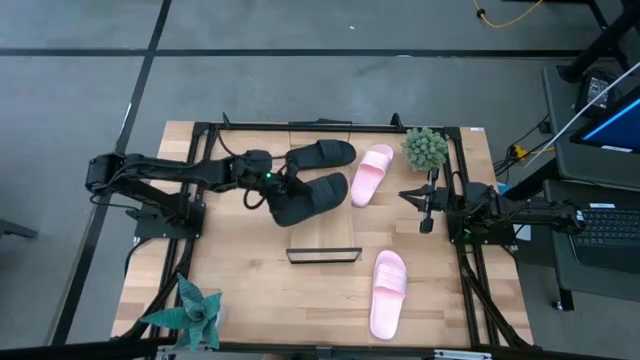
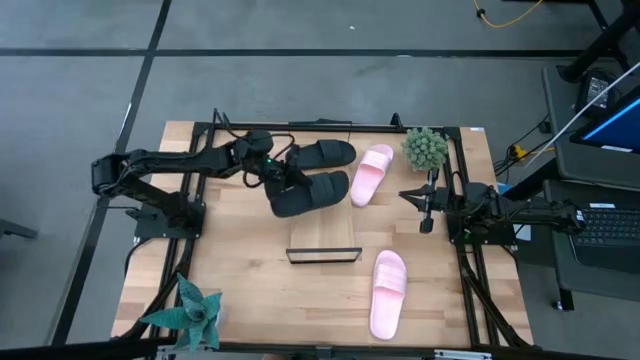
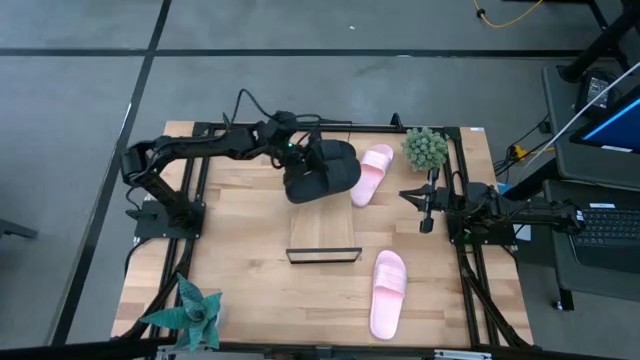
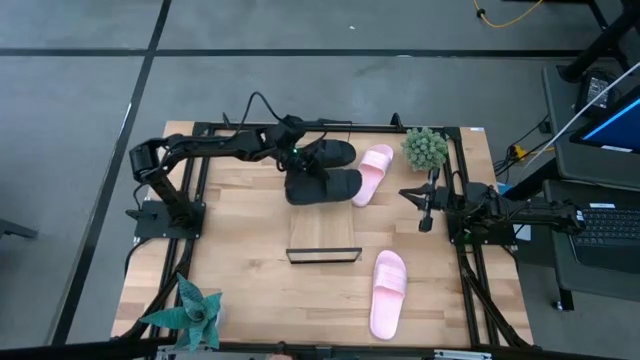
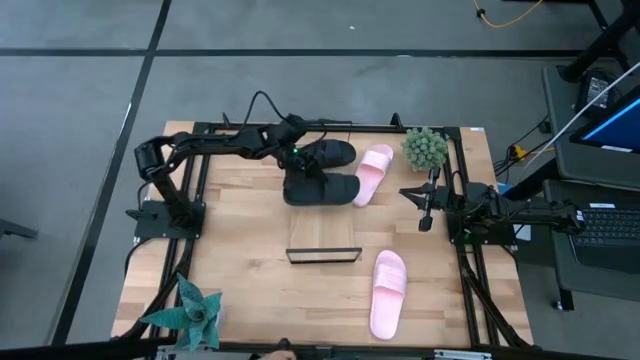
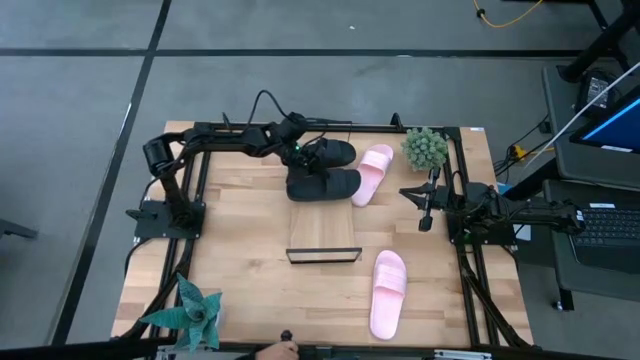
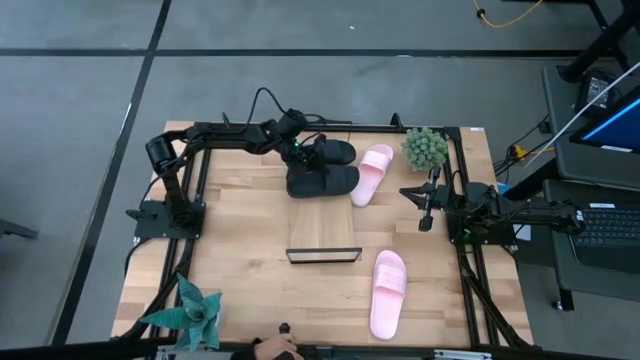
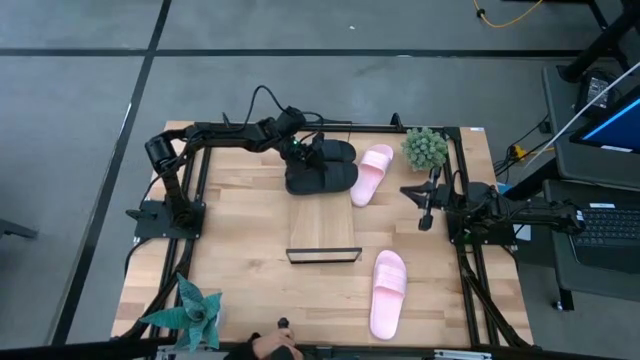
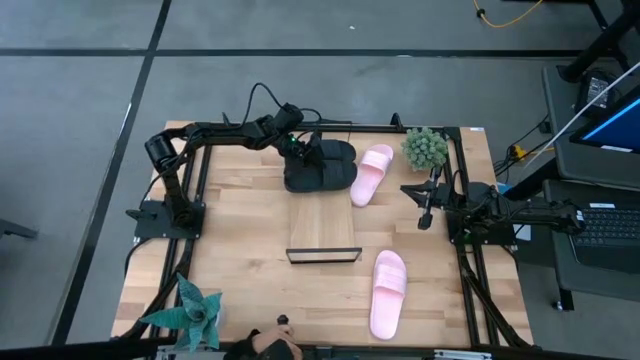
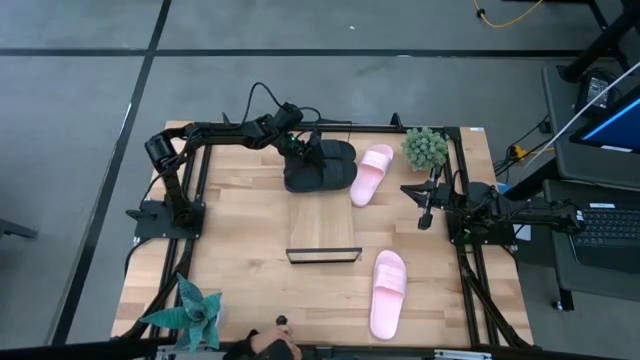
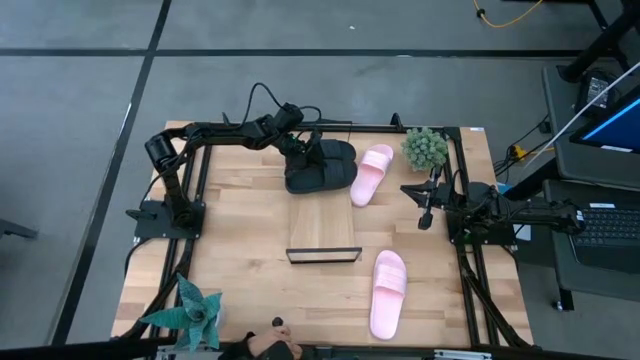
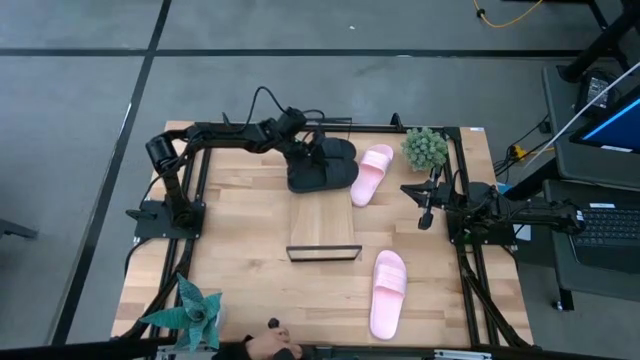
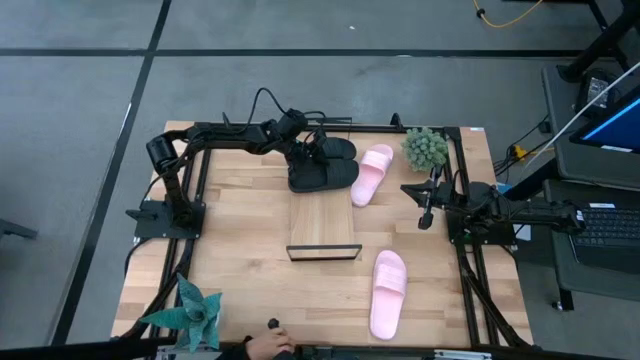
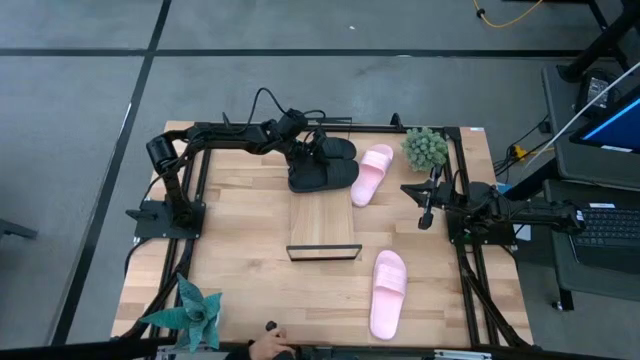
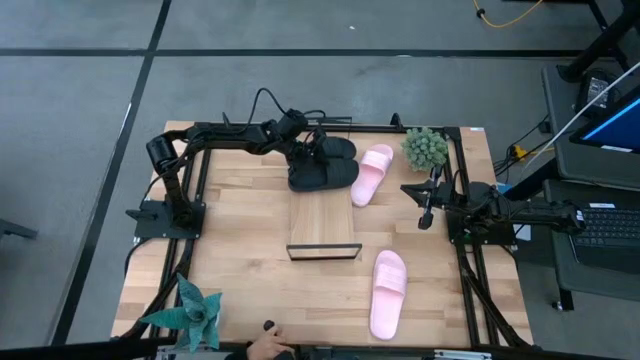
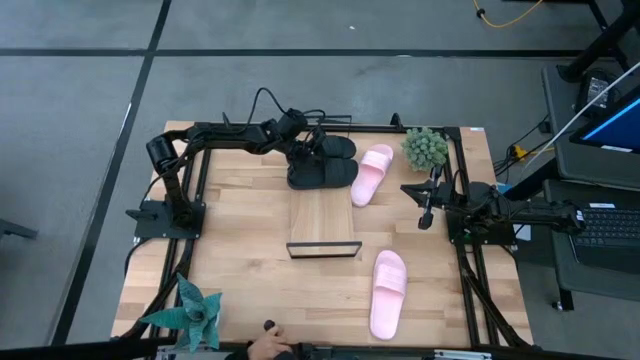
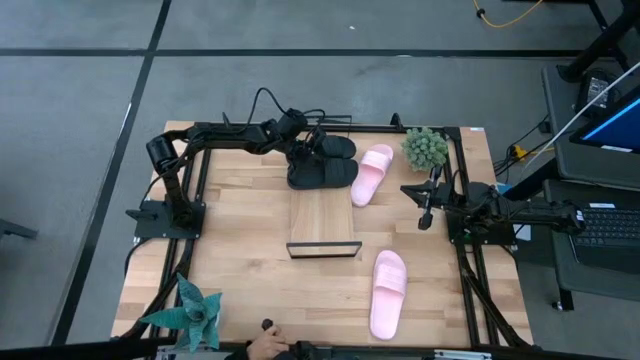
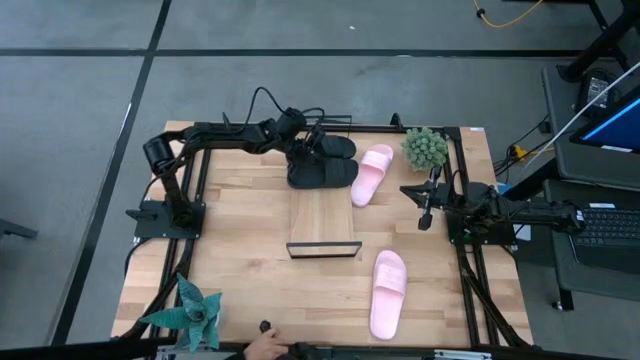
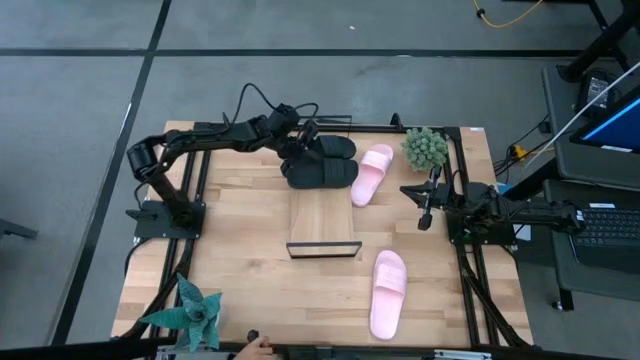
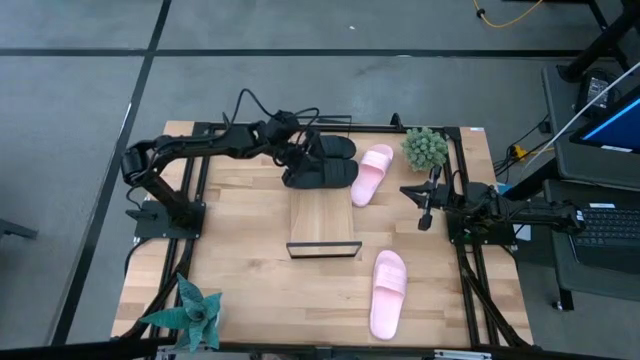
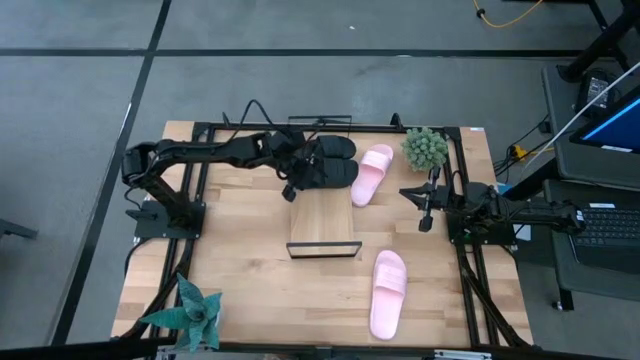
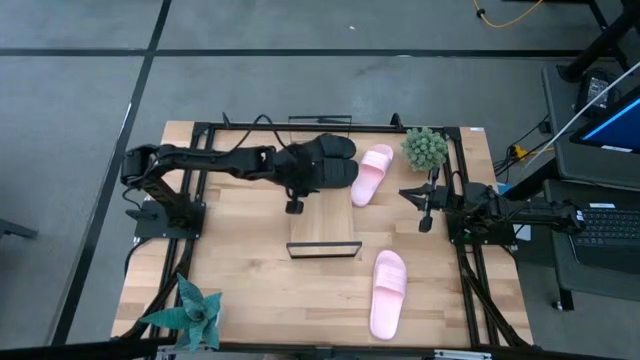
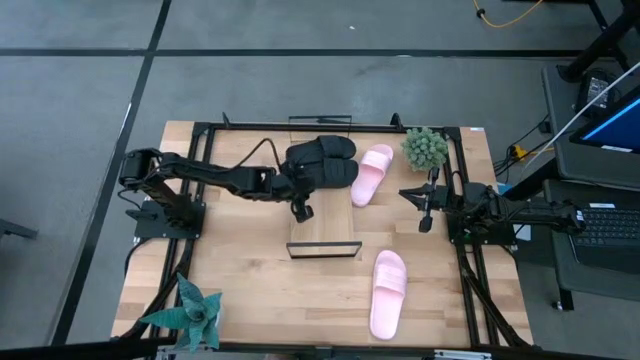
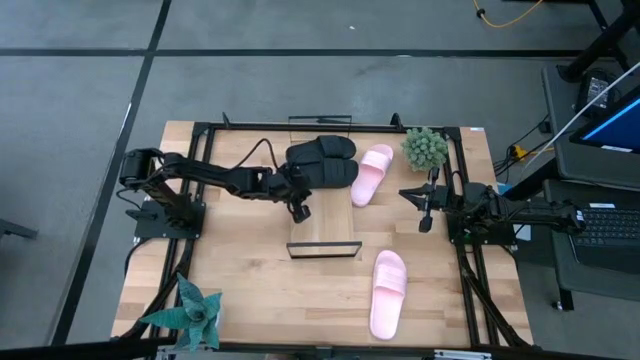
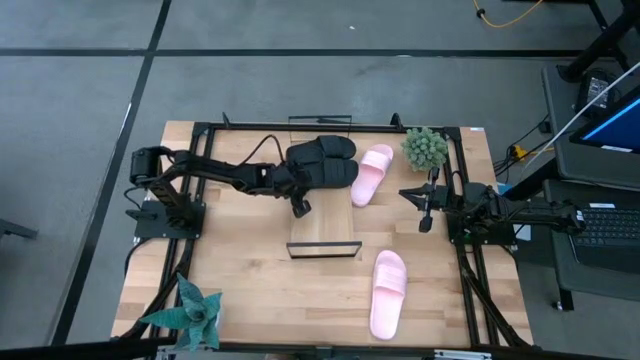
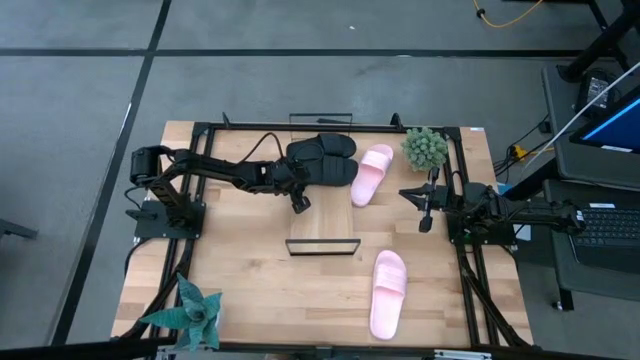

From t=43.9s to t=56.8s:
Task: Pick and place slides into the shelf
Put the black slide on the shelf

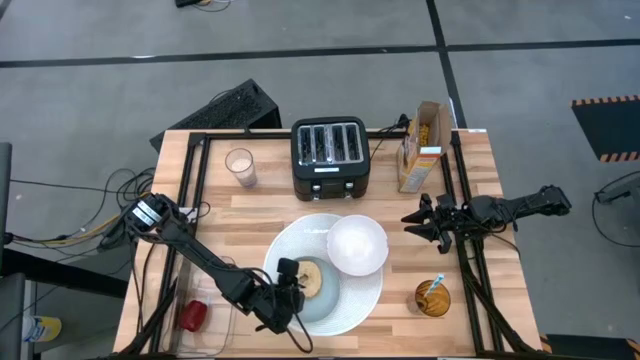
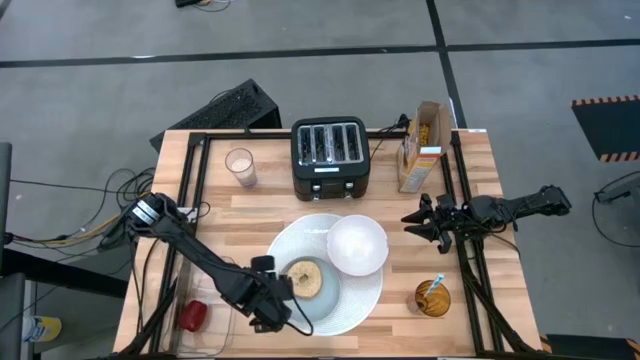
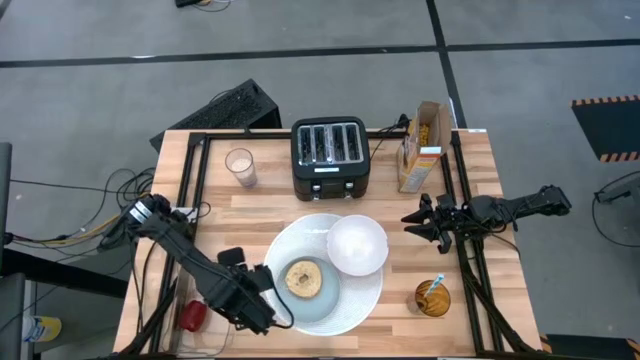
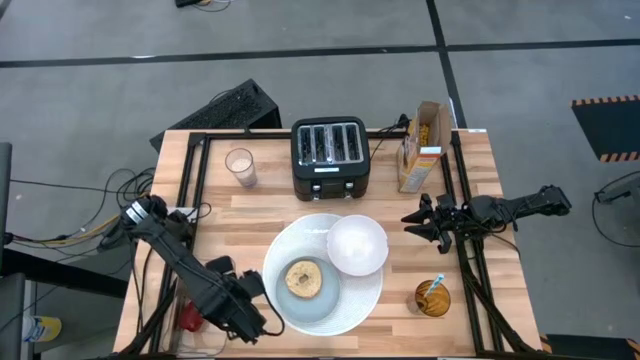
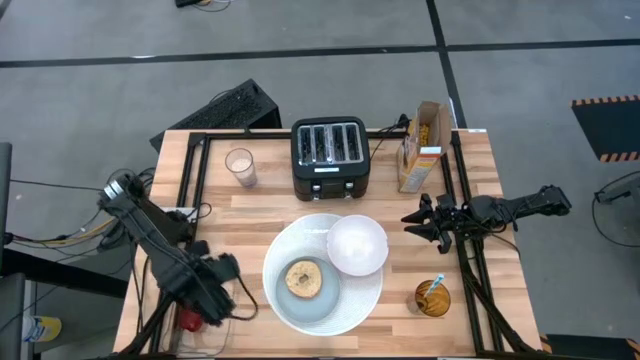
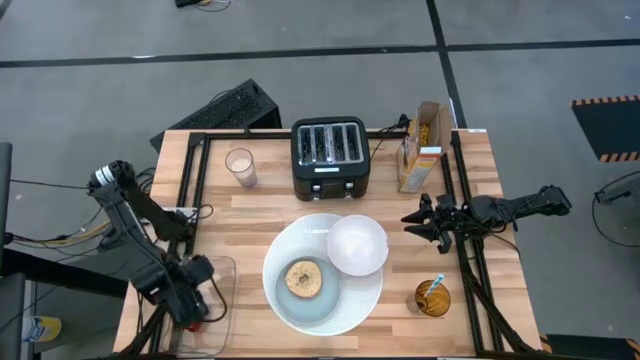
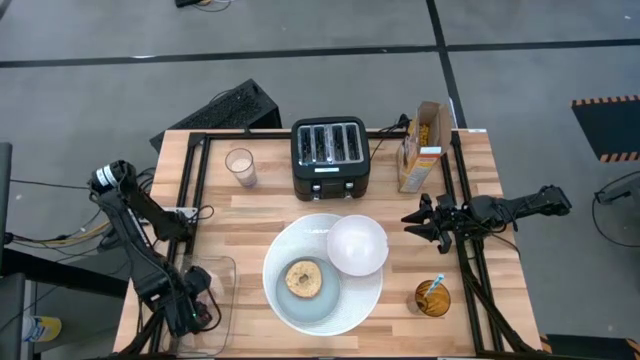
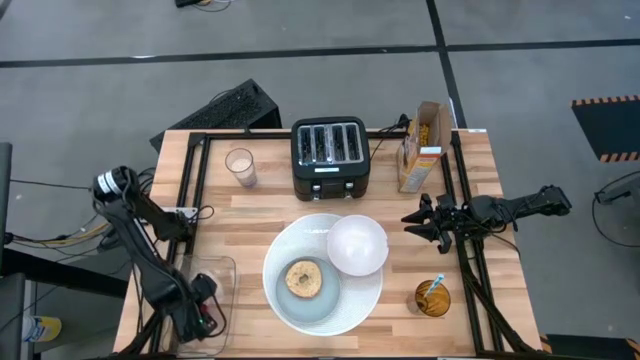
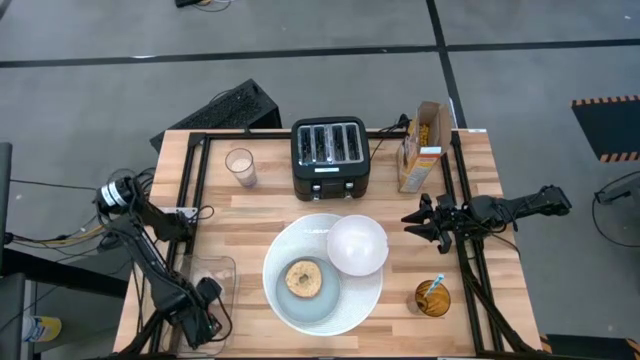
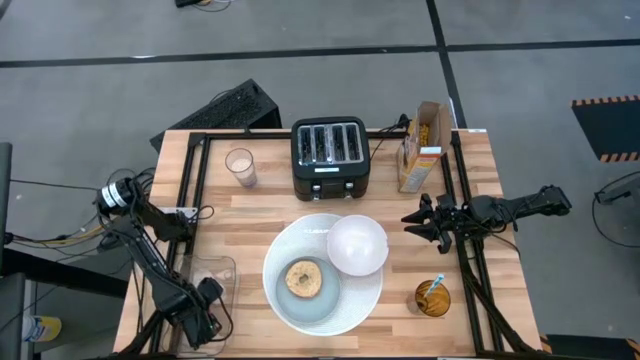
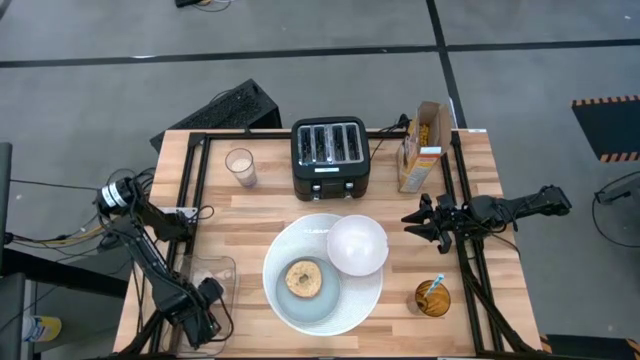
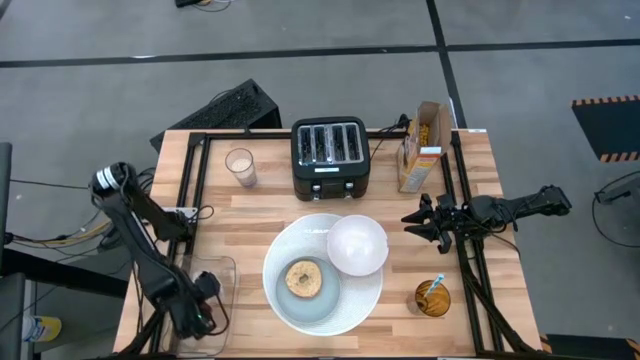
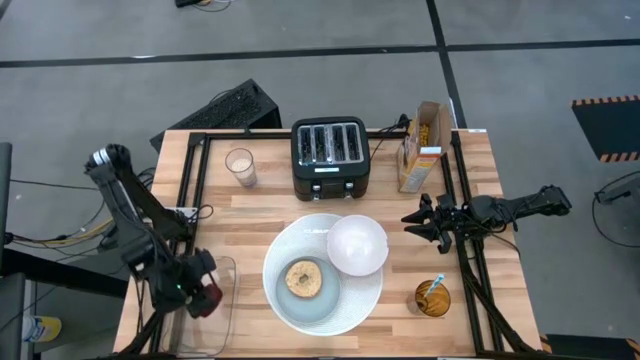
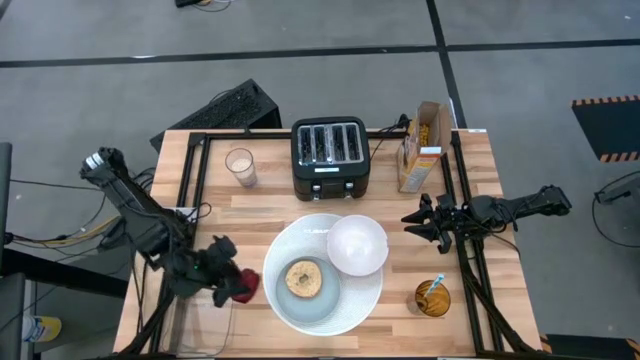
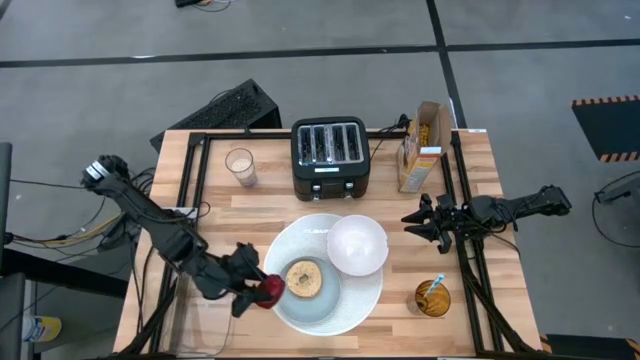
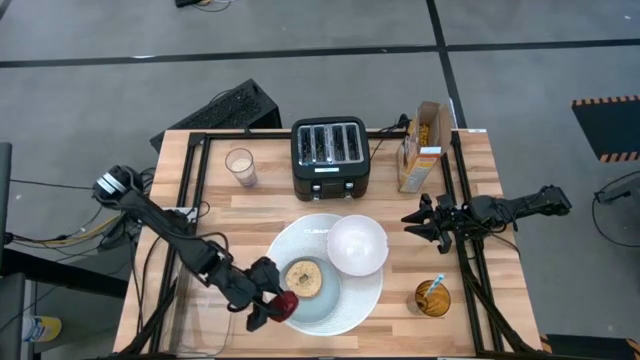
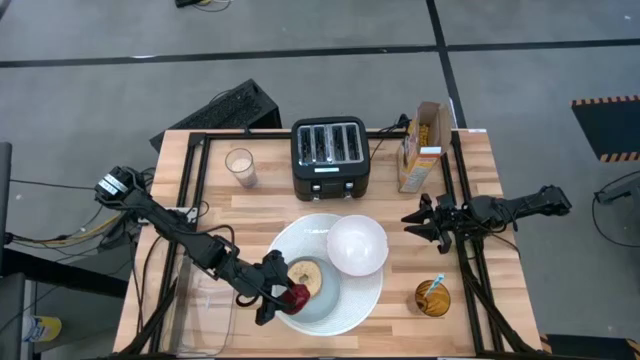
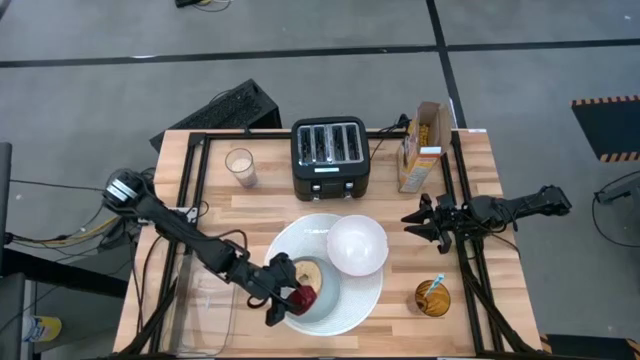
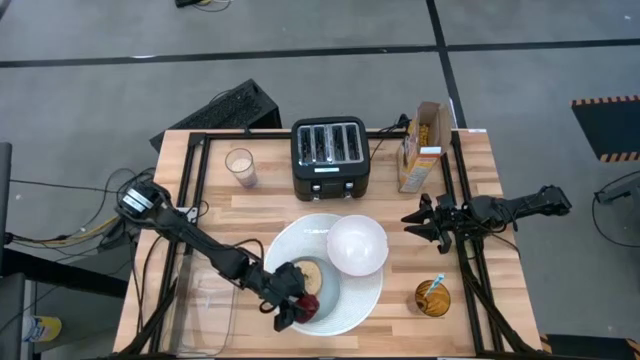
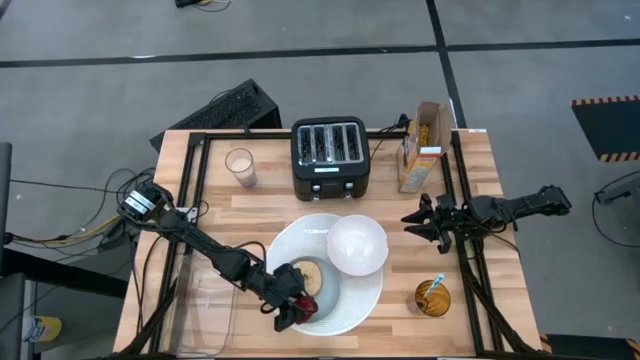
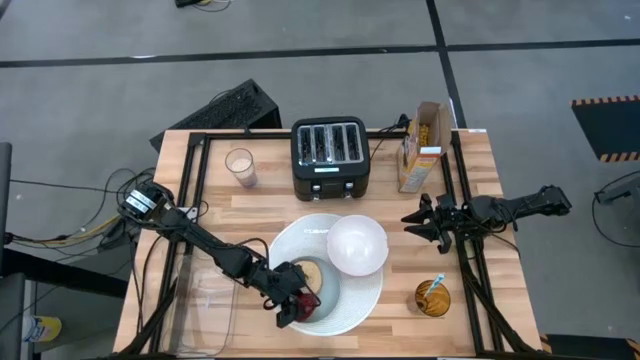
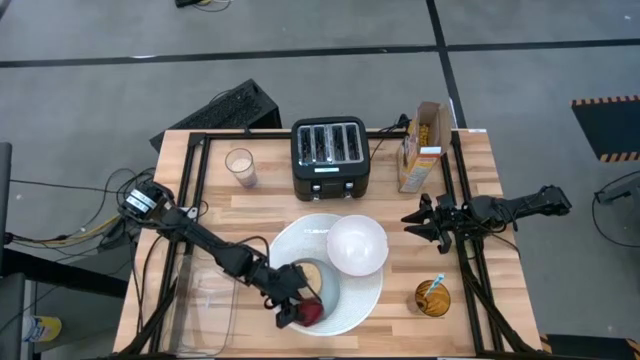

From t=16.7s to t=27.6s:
Task: Arrange a breakfast setting
Put the red apple on the light blue plate
